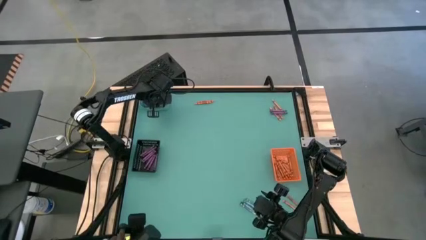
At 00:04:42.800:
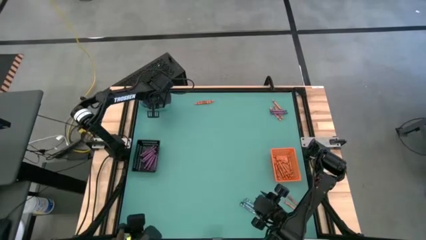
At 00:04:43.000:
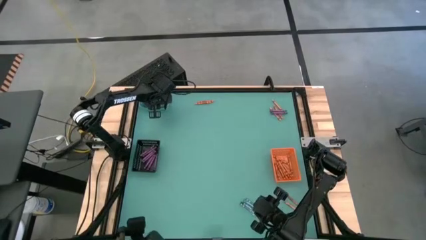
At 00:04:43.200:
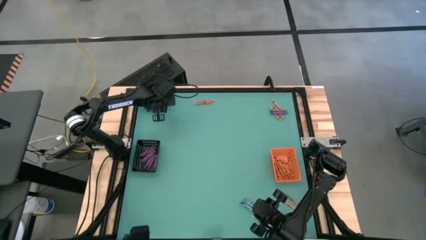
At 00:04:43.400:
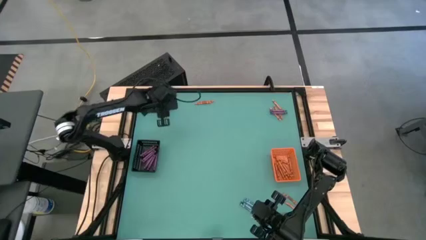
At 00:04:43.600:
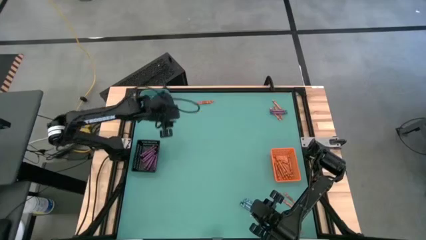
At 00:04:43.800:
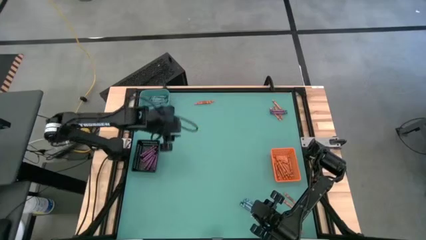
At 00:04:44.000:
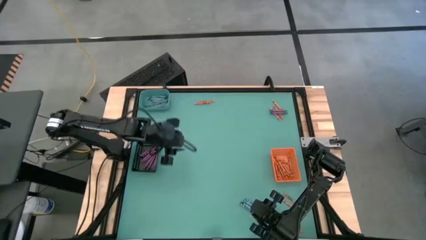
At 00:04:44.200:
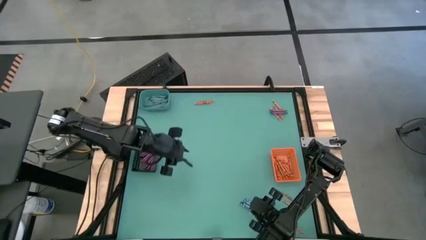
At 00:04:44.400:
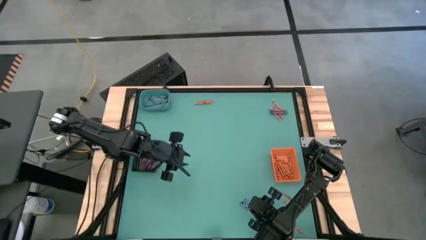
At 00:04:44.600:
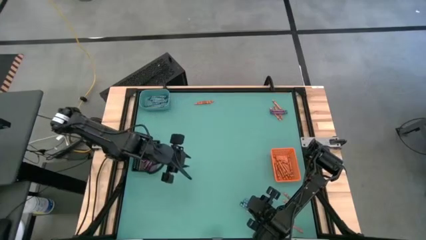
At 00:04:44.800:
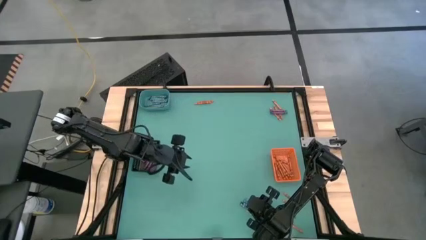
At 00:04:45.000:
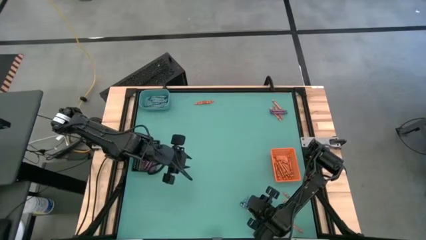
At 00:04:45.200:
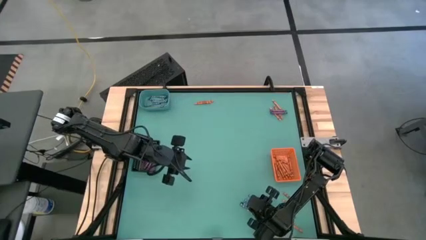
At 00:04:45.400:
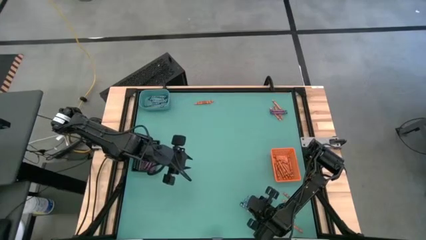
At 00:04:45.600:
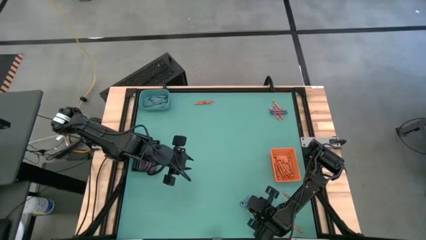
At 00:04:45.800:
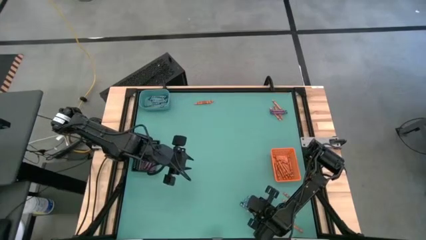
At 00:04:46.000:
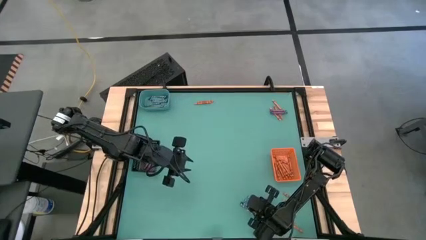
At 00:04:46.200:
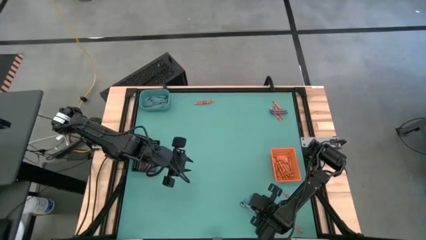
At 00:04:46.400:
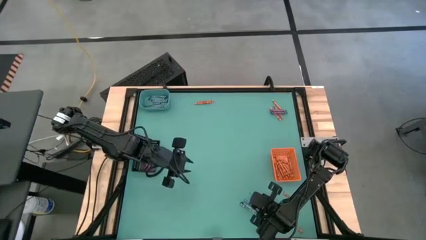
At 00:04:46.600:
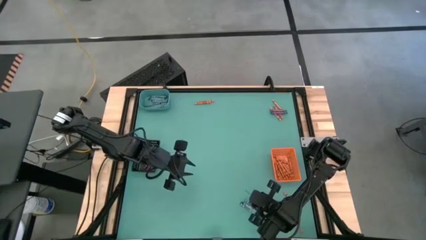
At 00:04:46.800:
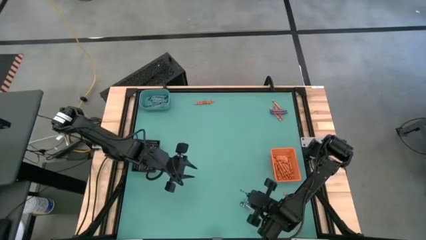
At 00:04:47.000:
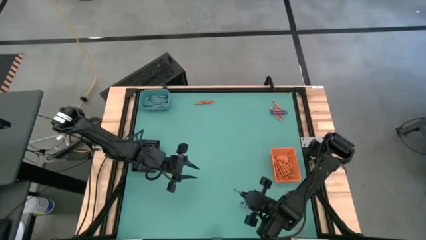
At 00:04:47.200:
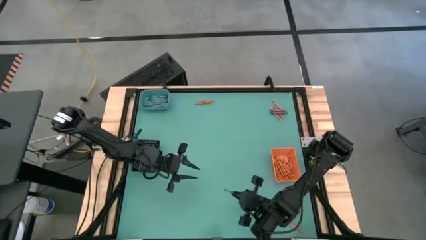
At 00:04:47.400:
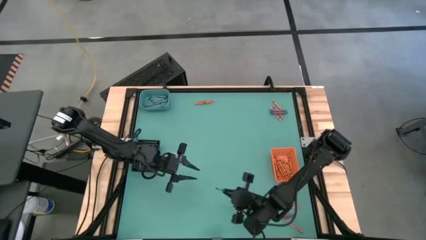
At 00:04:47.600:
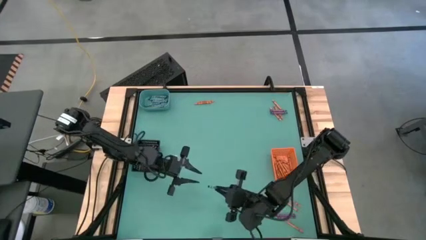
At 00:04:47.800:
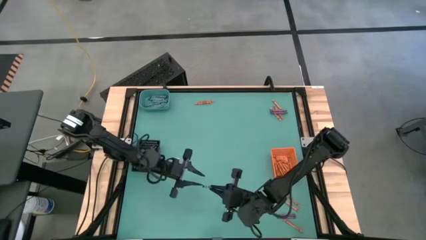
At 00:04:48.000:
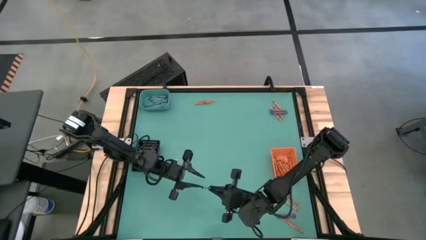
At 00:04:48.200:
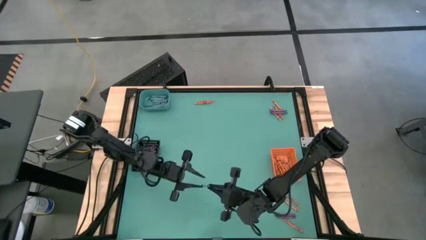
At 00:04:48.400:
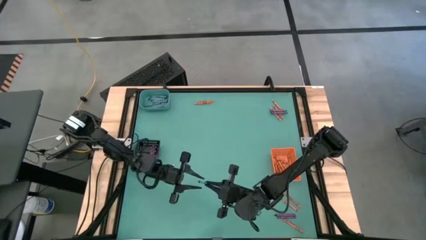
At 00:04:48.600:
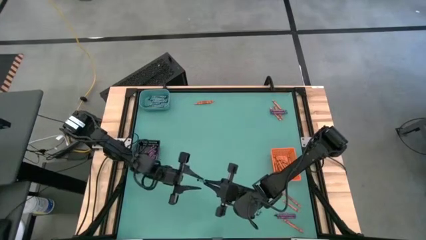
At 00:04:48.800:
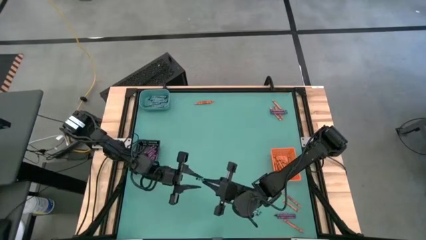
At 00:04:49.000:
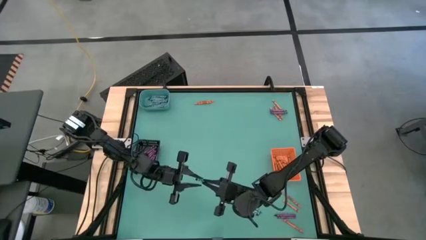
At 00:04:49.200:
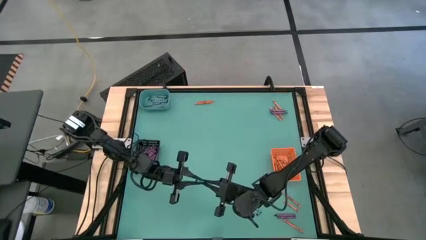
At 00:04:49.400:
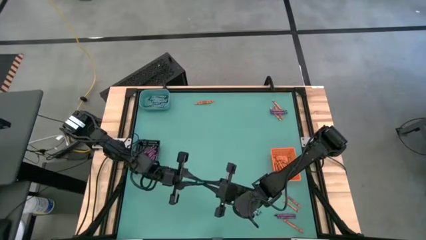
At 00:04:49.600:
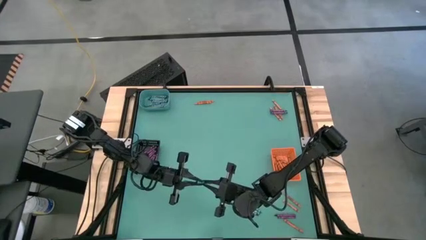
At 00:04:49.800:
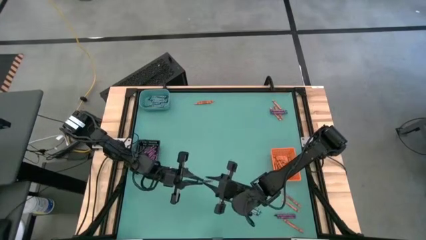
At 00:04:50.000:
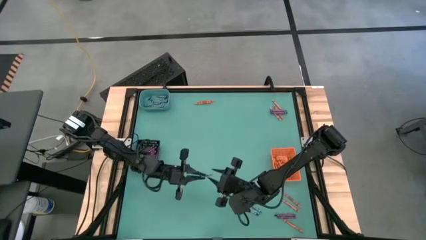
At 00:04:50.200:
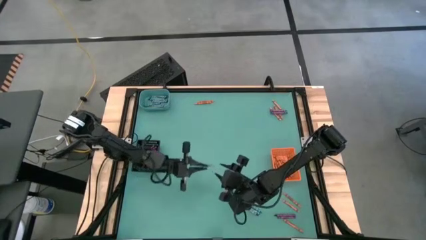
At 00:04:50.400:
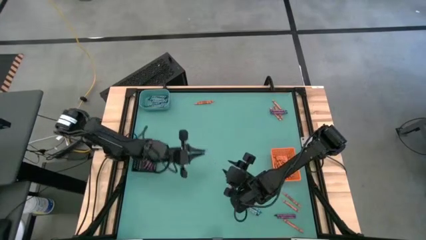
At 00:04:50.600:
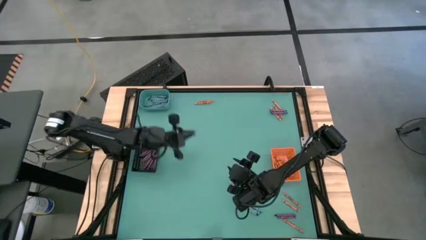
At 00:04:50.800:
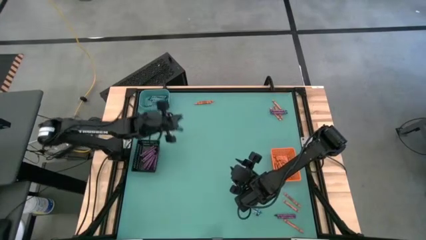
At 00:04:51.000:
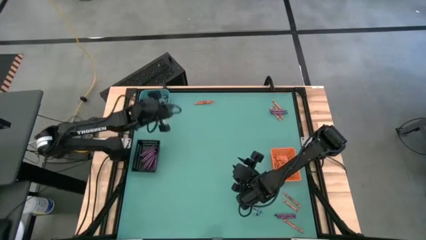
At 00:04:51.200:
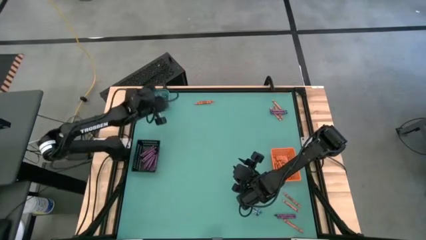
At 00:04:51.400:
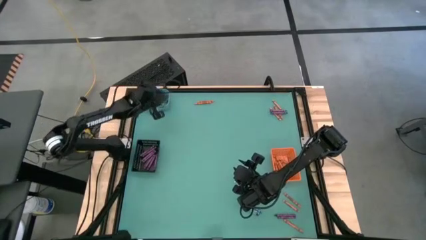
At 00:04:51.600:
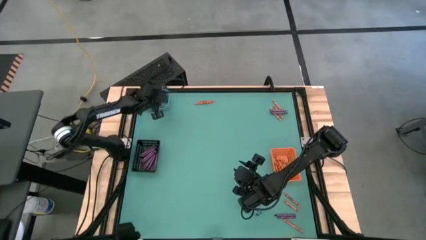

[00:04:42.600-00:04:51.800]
Task: Sort crayons
Put the blue crayon into the green bin

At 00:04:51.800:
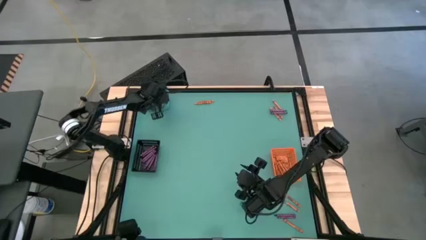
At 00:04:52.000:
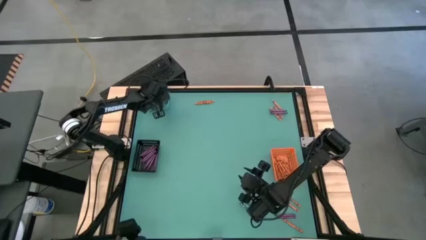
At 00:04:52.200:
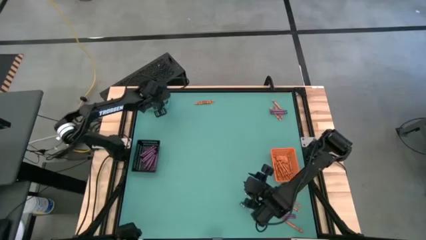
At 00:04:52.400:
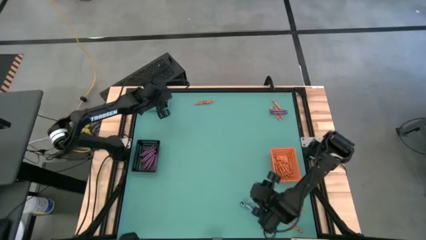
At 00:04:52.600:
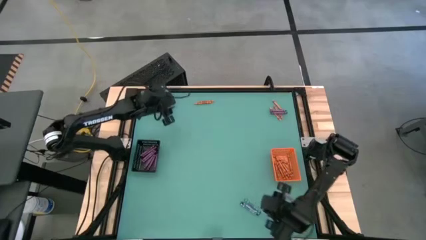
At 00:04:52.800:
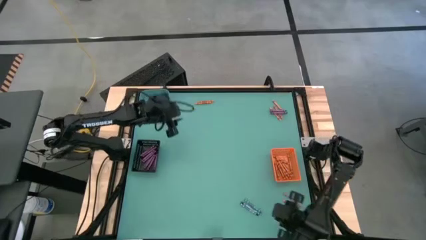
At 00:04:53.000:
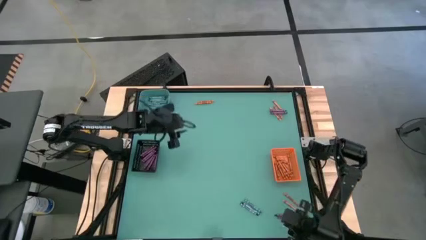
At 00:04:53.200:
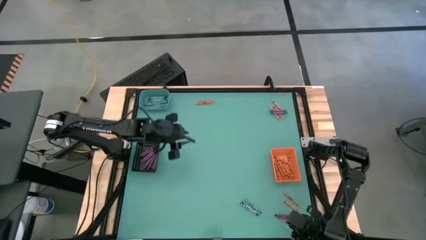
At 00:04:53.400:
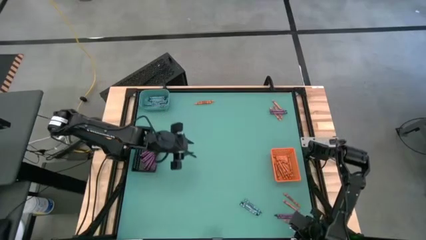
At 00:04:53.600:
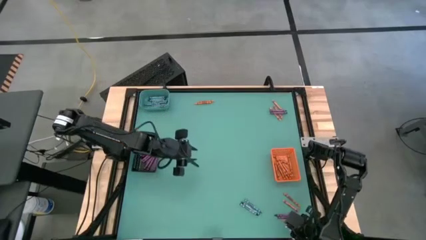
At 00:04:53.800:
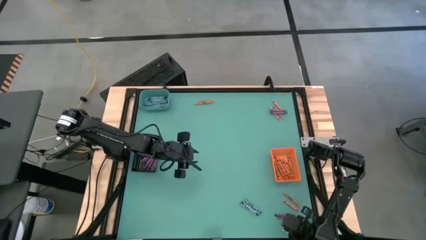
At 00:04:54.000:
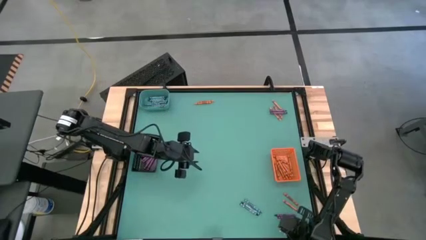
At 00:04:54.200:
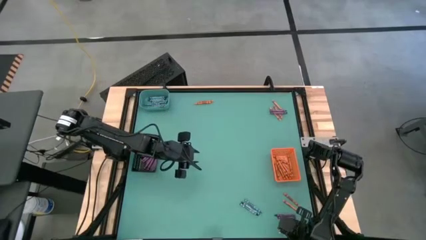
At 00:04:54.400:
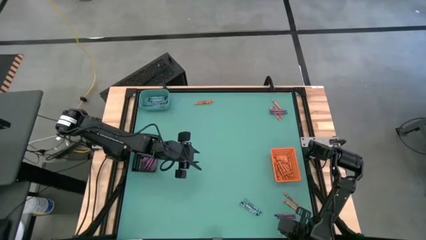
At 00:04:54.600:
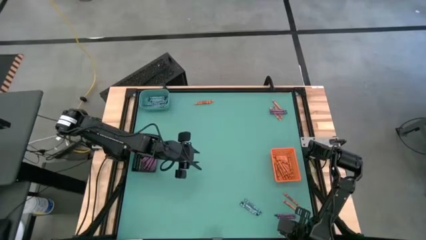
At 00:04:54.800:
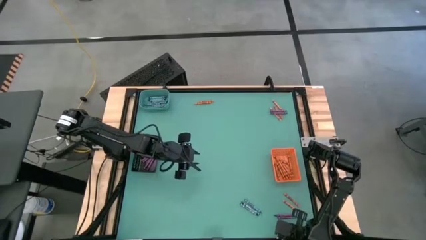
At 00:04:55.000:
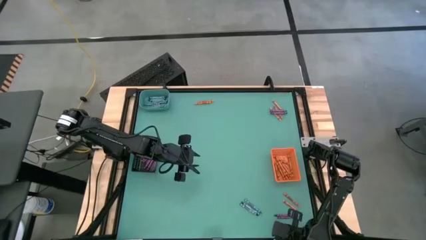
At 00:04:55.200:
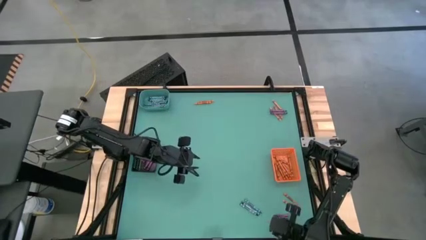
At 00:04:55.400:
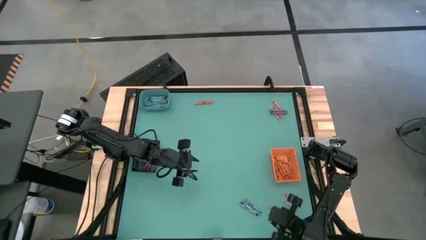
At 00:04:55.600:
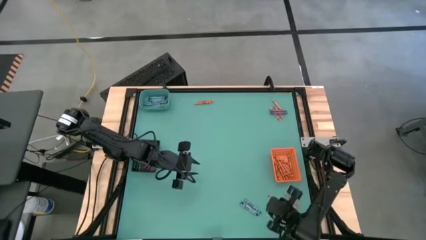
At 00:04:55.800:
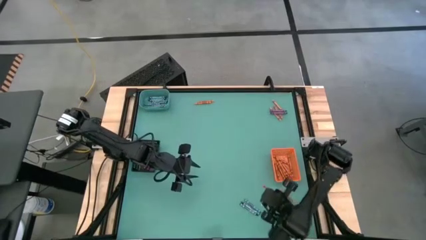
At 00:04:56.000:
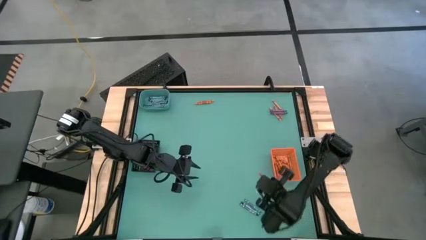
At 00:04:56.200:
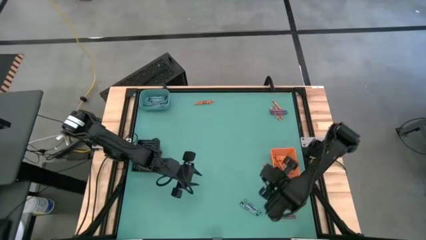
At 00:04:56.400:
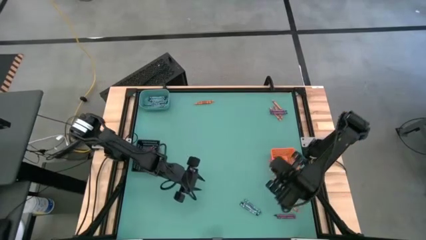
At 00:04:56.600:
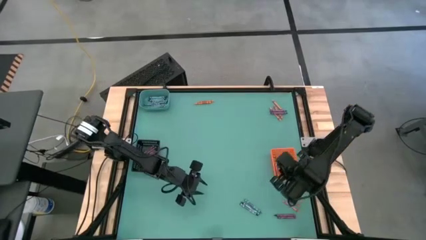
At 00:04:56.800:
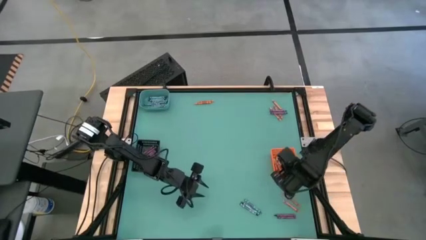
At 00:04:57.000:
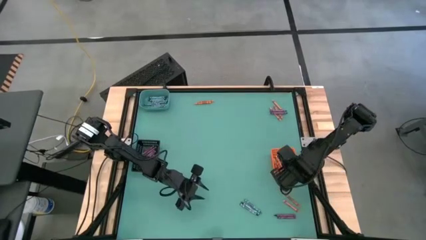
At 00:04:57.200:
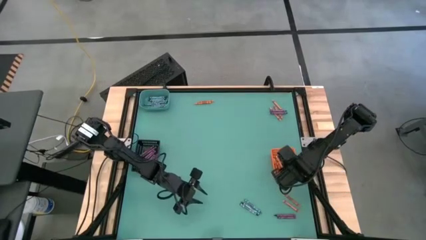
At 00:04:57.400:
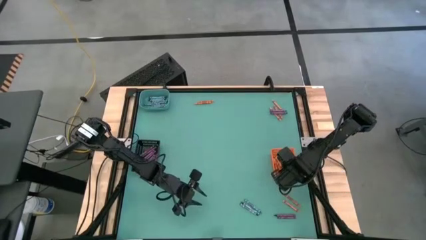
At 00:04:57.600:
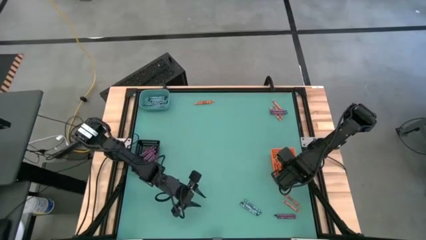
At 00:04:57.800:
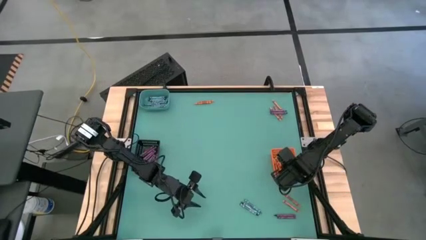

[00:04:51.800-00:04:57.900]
Put the orange crayon into the orange bin

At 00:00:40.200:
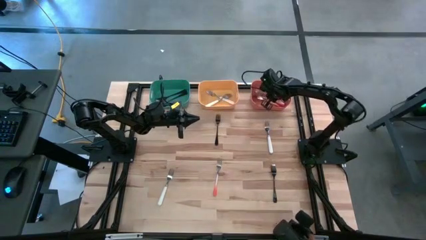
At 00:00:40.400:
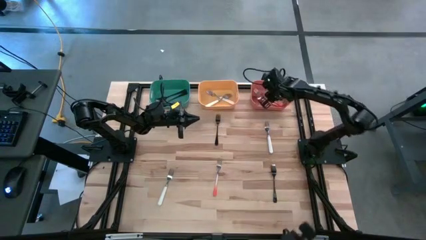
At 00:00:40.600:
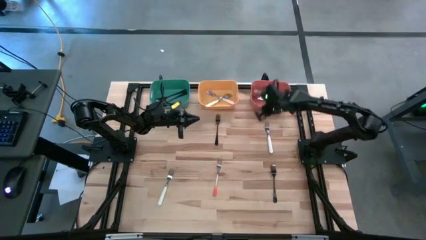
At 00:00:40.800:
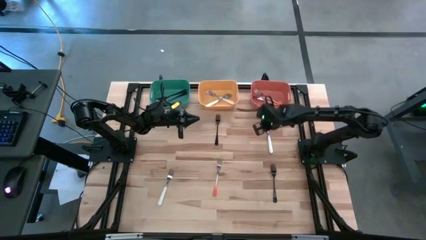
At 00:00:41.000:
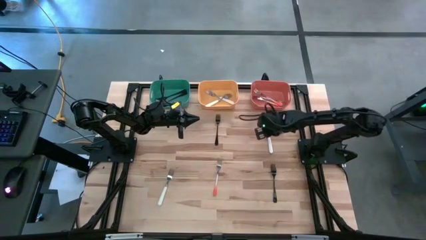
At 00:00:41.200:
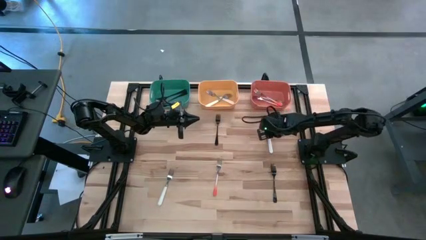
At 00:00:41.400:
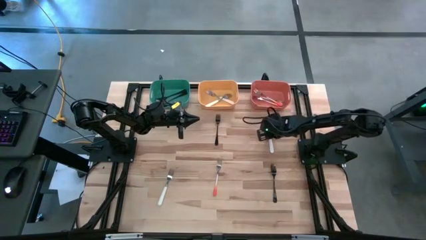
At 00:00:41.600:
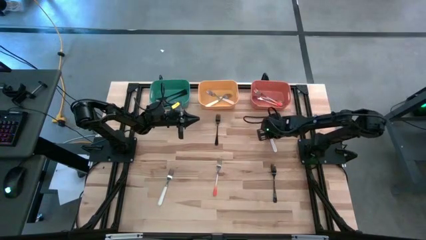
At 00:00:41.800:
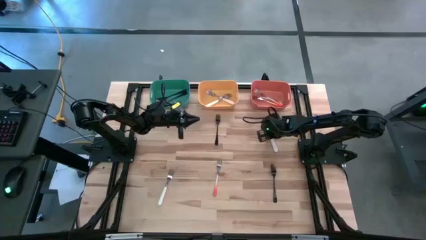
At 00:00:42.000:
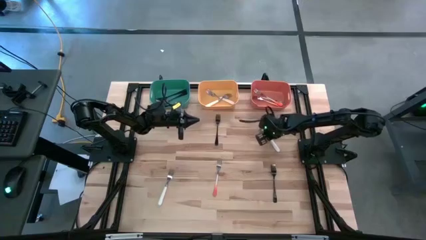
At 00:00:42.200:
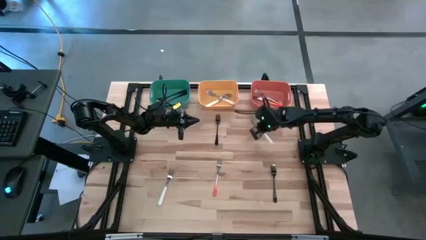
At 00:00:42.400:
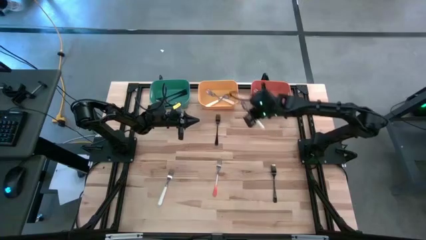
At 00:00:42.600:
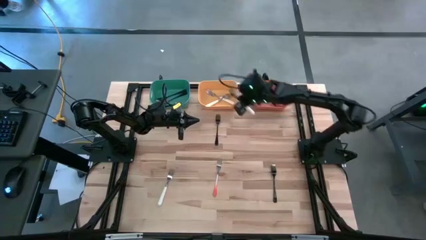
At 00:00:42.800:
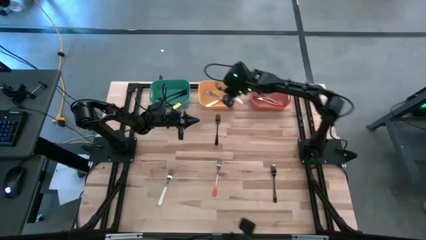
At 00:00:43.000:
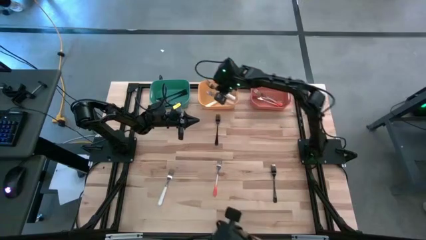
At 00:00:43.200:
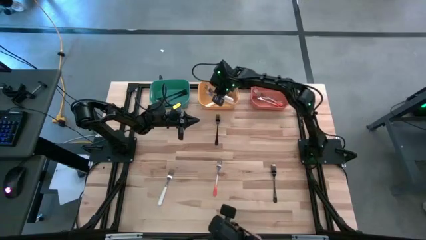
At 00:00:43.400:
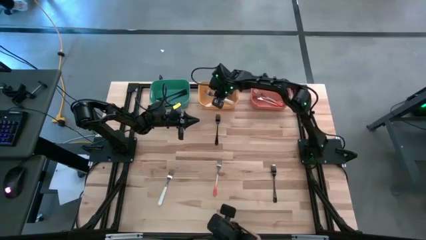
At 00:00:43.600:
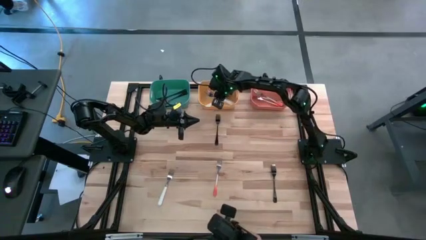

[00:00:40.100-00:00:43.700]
Task: Sort silverware by color (type)
Put the white fork into the yellow bin
